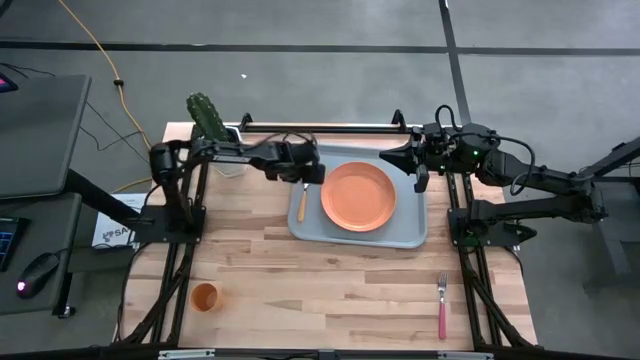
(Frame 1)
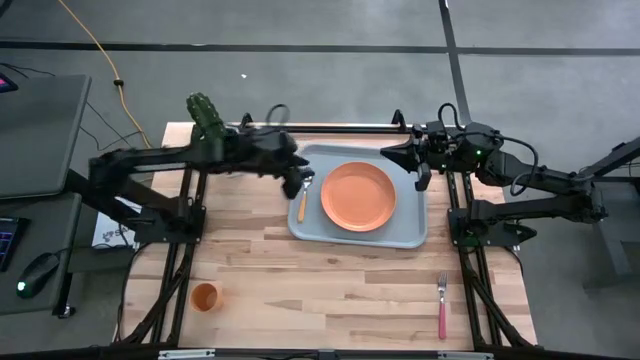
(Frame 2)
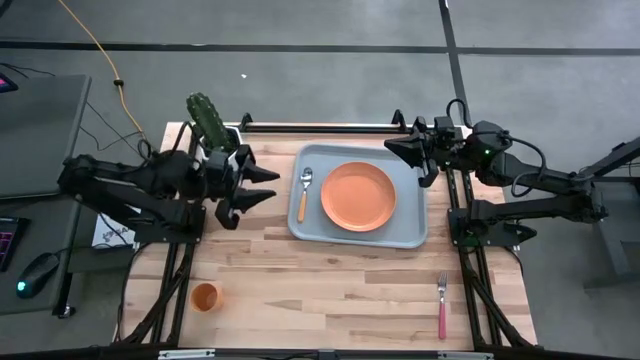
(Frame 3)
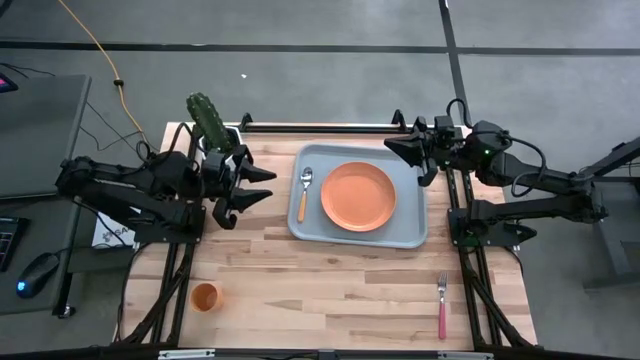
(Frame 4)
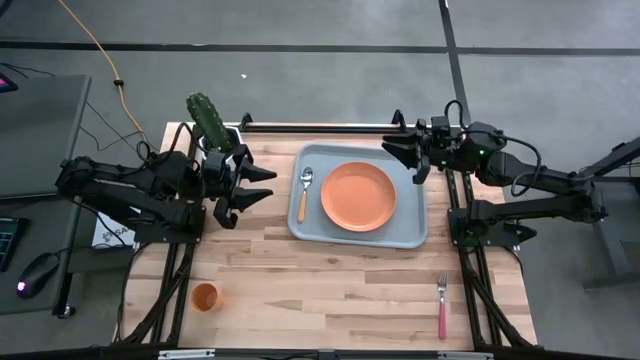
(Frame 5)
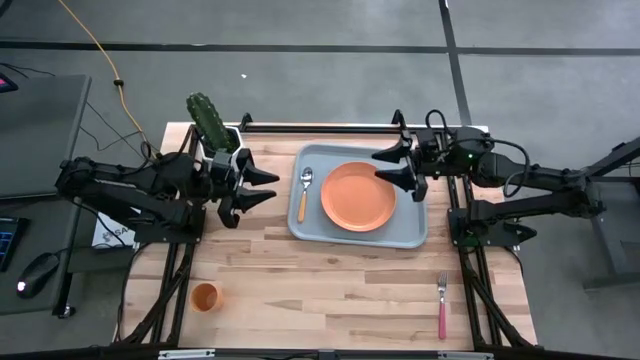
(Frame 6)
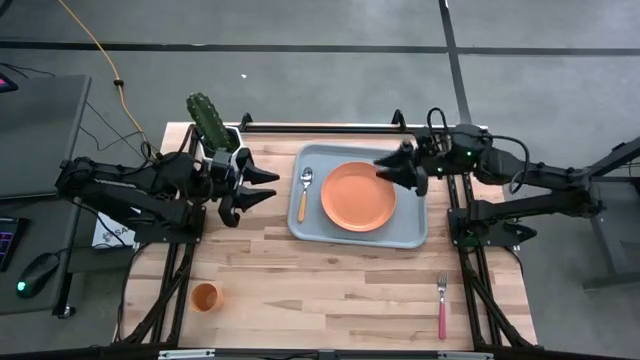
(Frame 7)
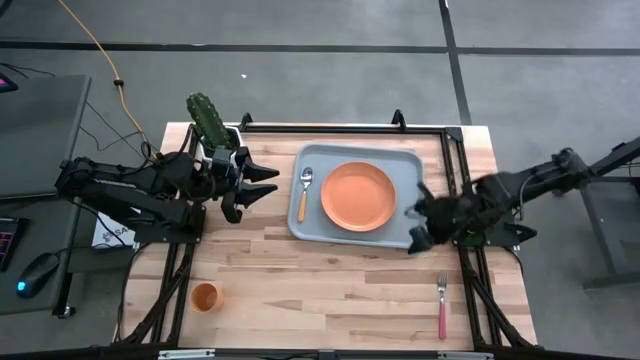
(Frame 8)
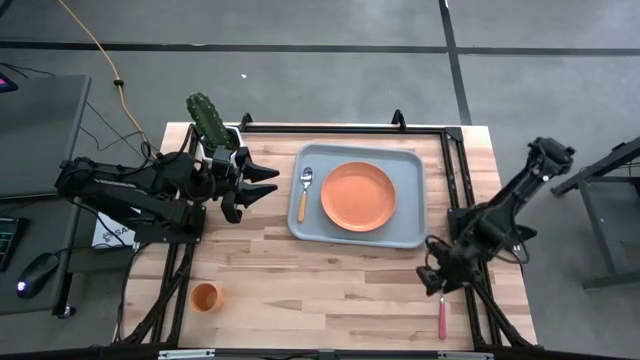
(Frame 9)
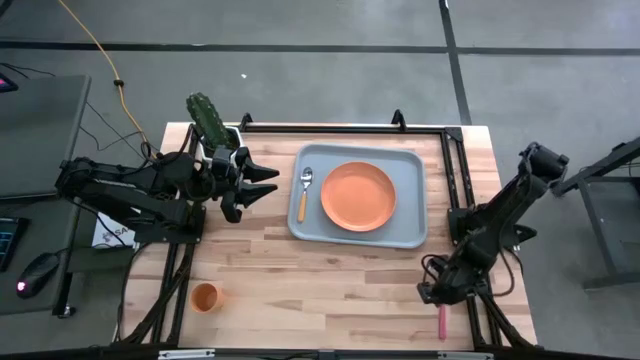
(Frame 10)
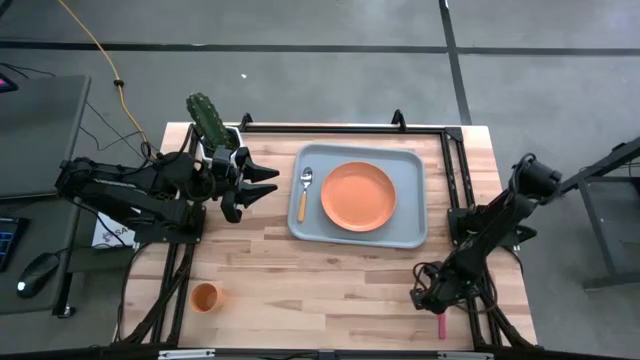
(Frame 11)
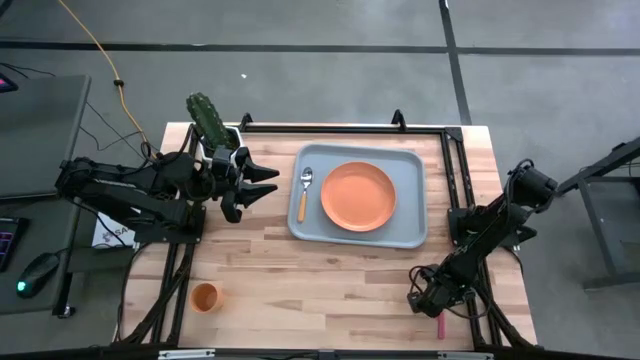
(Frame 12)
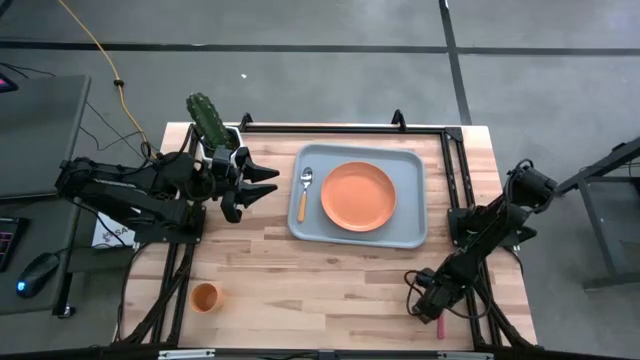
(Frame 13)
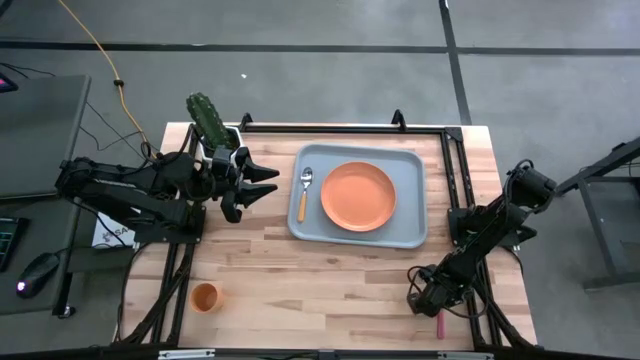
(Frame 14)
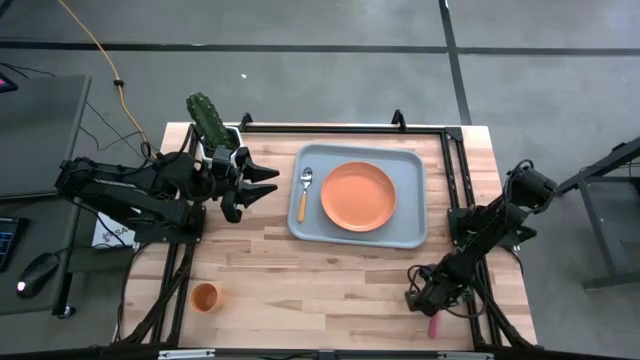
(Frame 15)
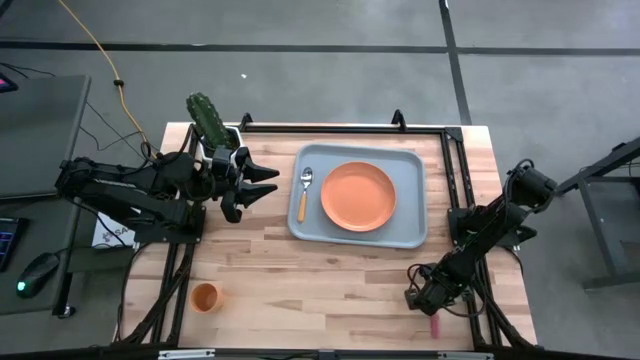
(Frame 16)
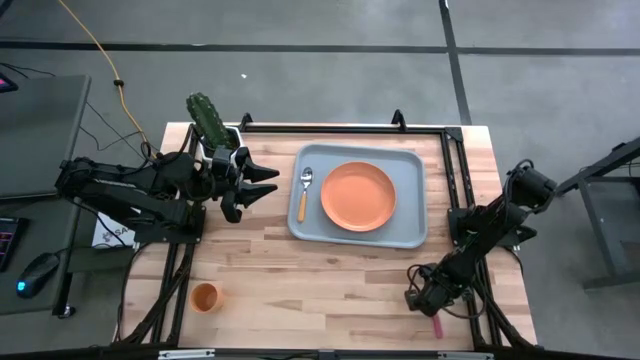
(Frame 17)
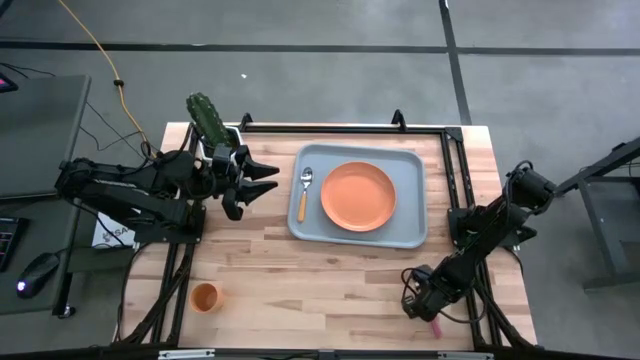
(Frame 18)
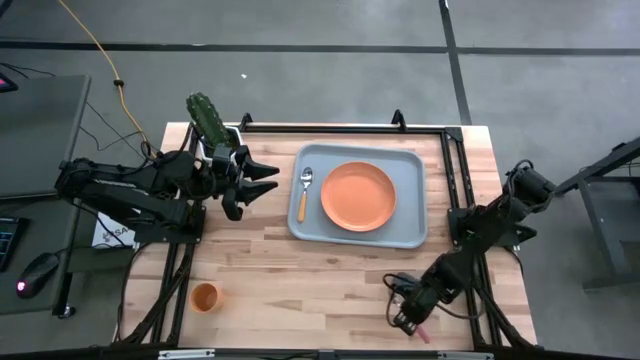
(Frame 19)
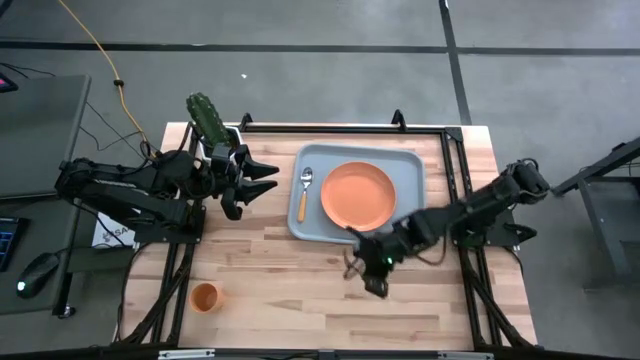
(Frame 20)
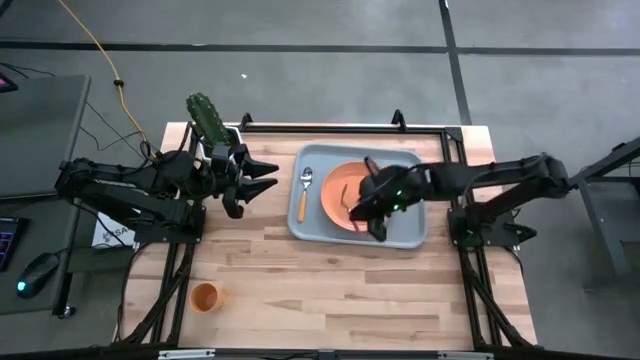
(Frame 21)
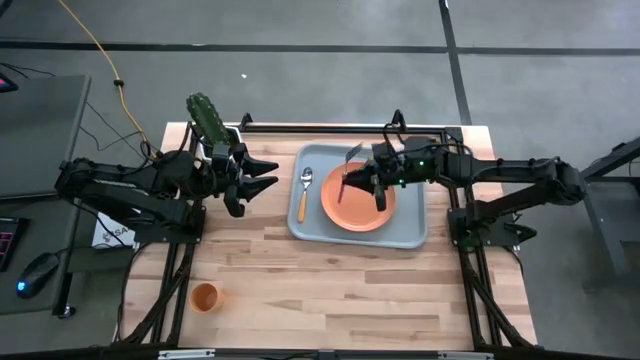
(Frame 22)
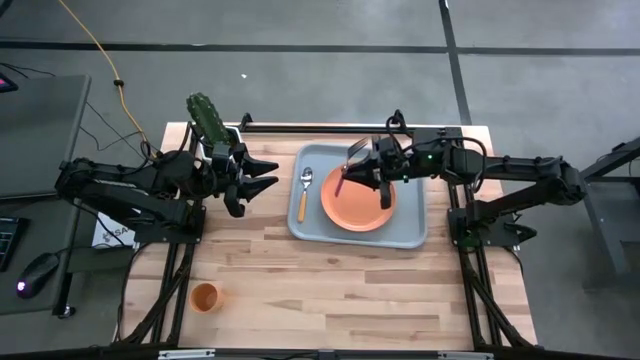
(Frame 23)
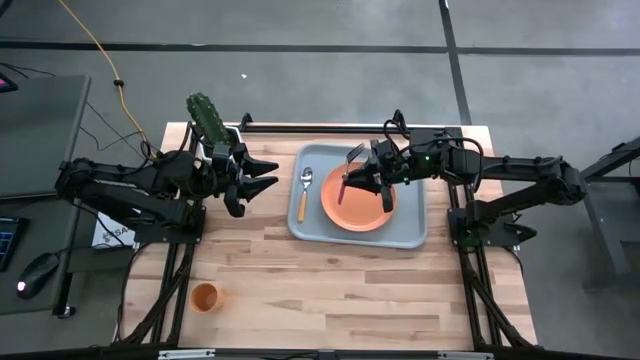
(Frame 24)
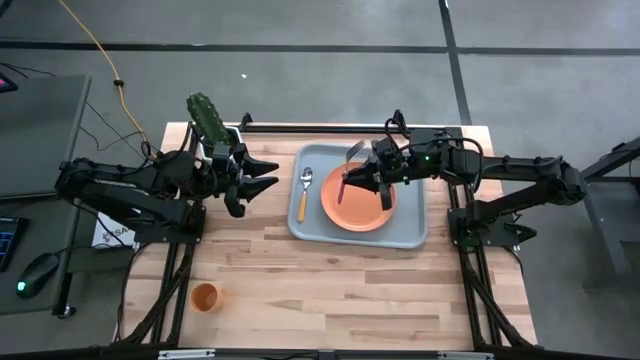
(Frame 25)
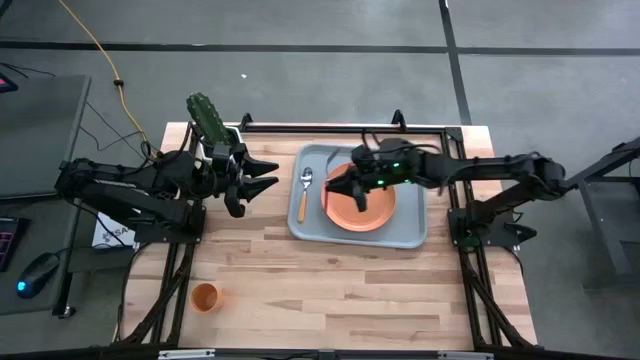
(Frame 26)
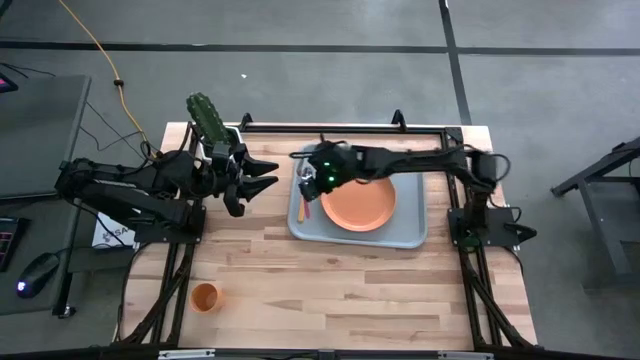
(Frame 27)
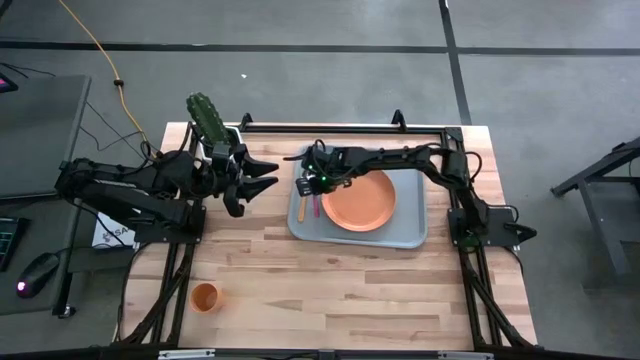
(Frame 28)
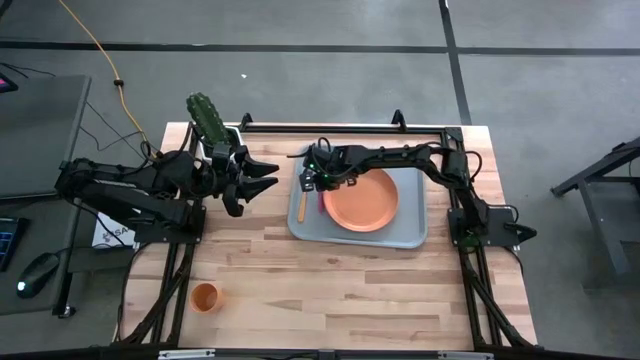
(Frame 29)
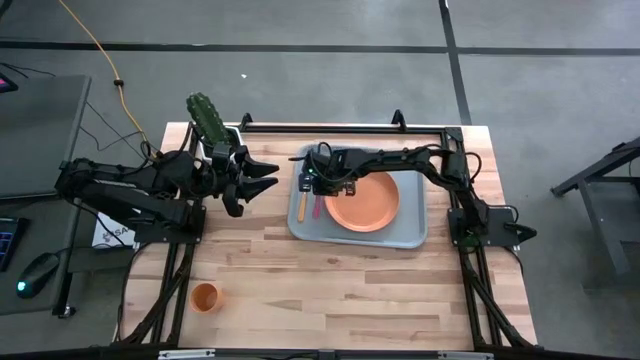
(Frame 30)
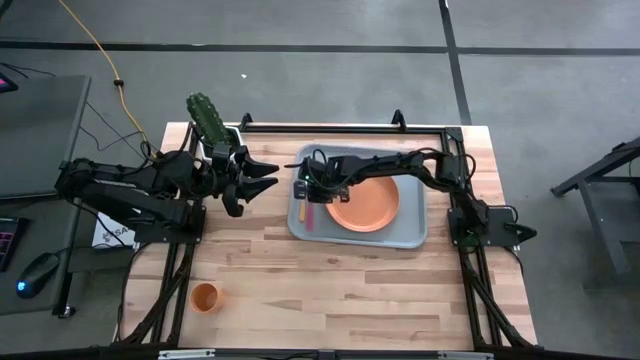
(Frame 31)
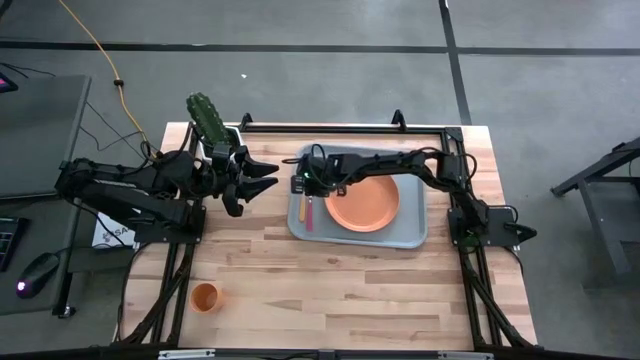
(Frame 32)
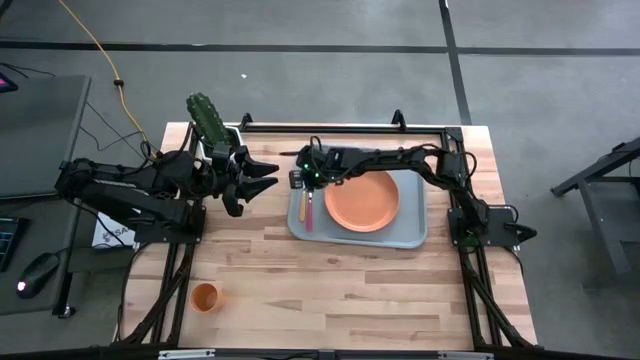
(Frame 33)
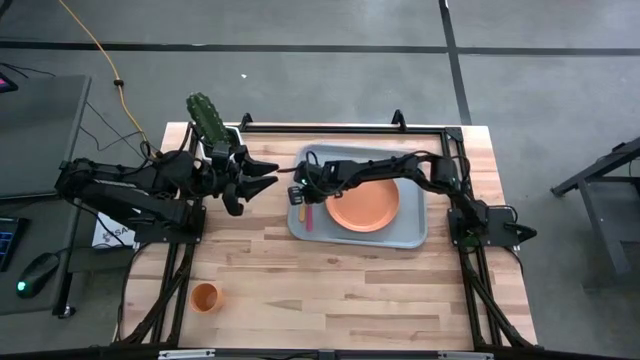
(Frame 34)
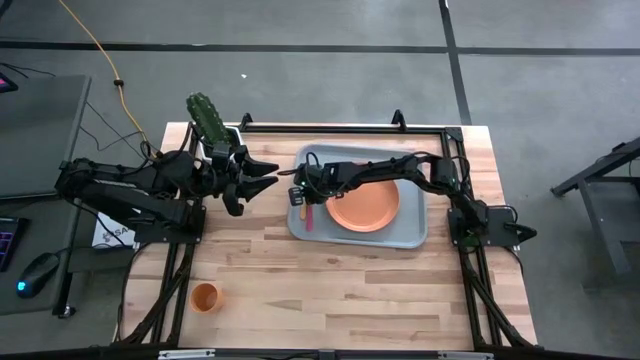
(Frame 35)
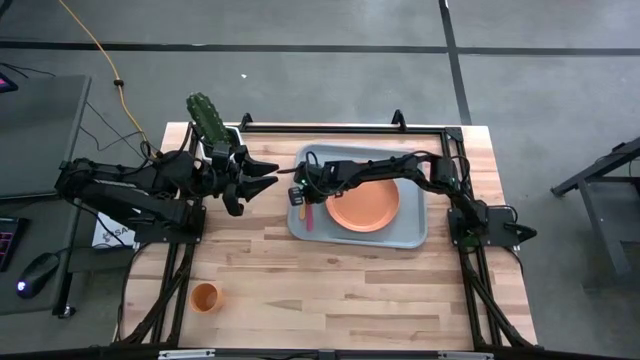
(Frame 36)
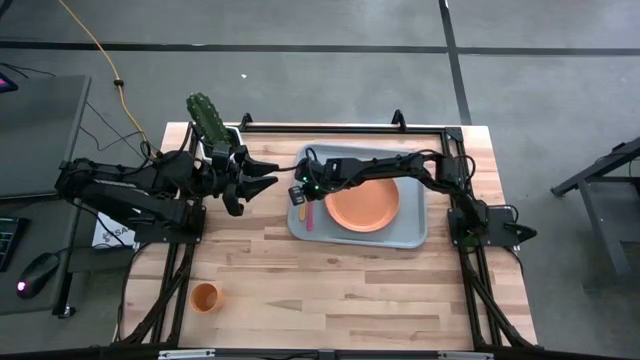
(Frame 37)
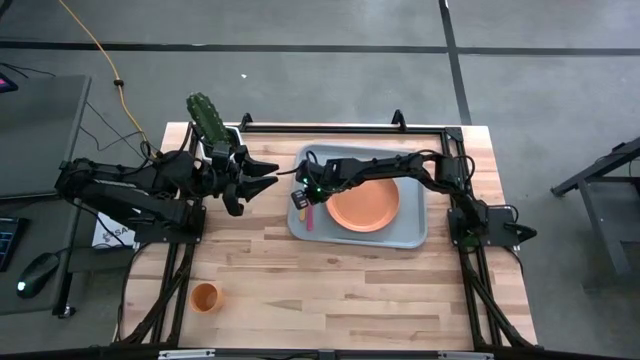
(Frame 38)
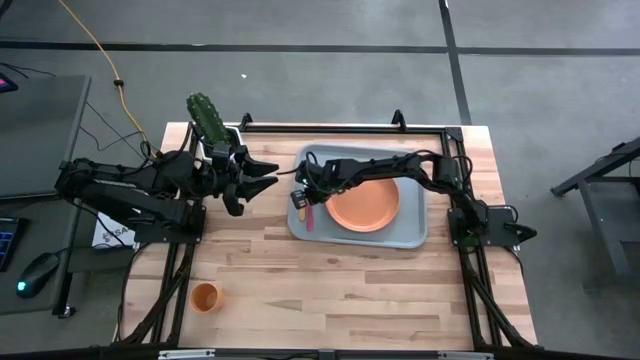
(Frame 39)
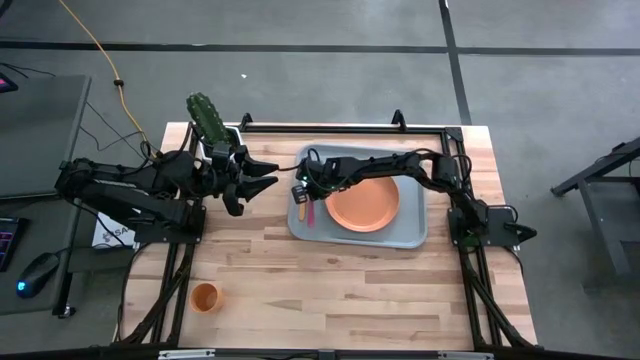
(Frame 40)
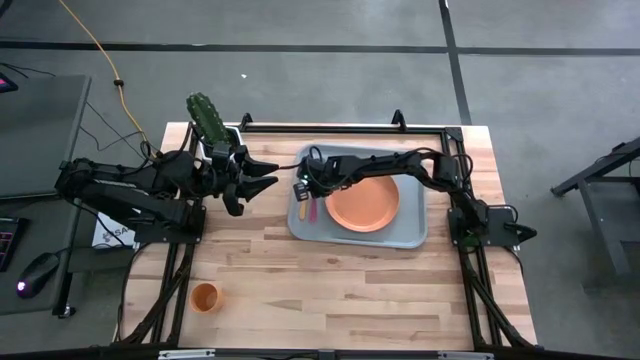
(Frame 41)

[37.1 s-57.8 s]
Task: Pick and place plate/cup/fork/spoon on tray
Put the pink fork to the left of the orange plate on the gray serving tray

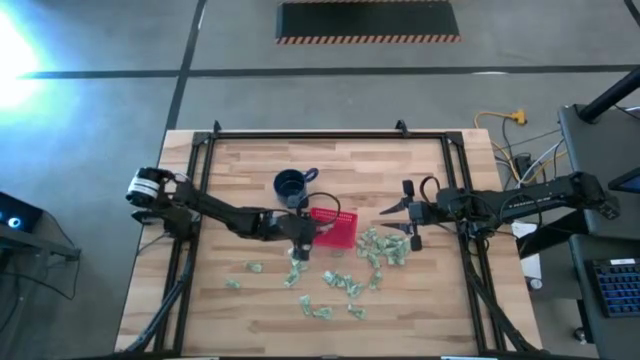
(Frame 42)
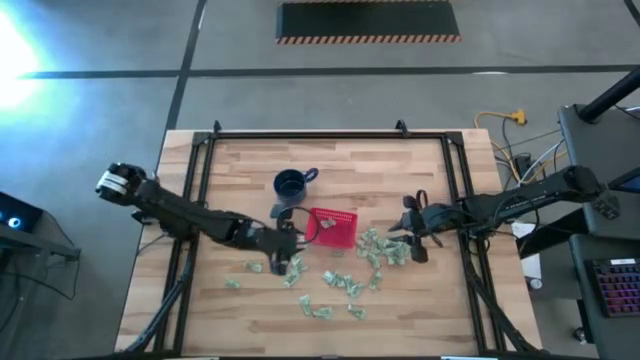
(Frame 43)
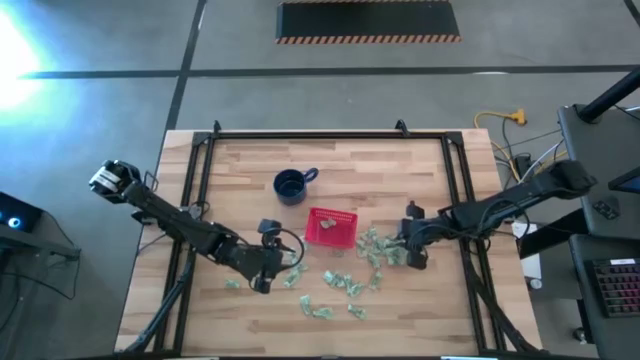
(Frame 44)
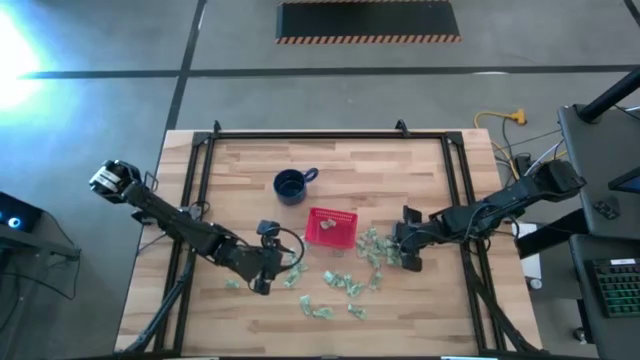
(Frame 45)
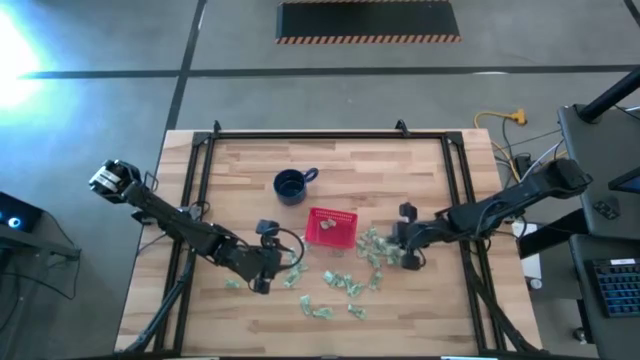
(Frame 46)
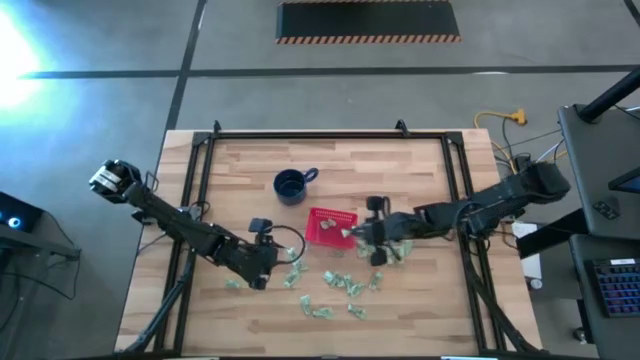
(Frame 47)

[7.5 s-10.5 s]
Task: Pick and place Stevia / Truvia into bins
Put the white stevia packet into the red basket
